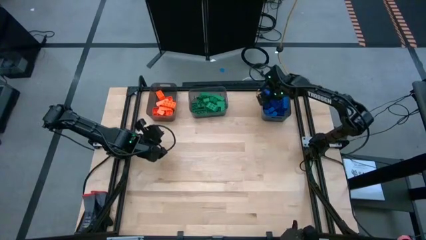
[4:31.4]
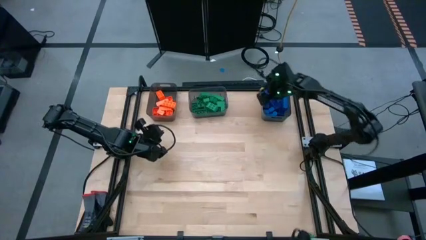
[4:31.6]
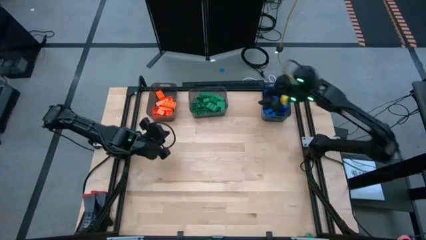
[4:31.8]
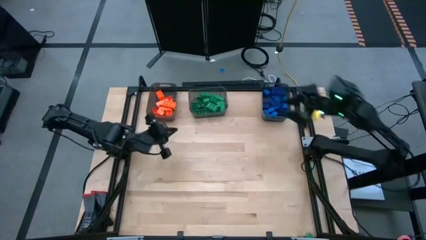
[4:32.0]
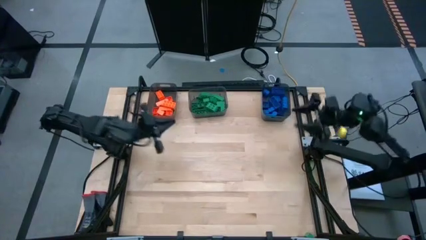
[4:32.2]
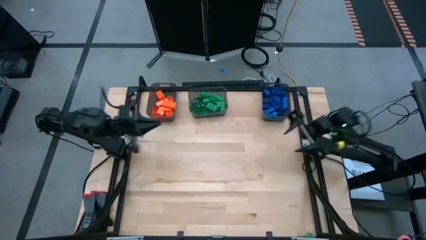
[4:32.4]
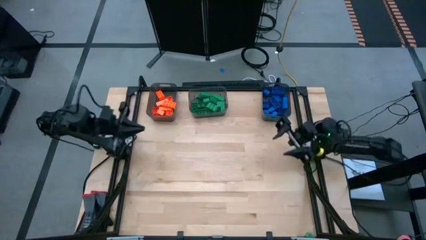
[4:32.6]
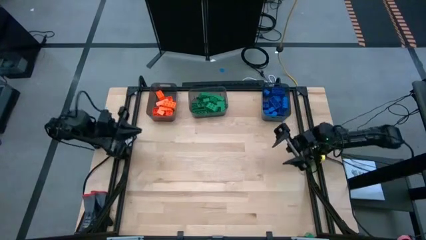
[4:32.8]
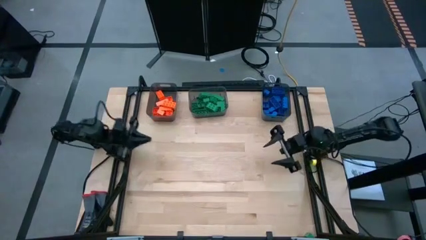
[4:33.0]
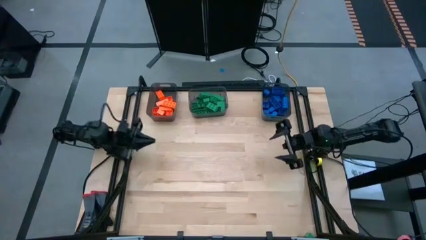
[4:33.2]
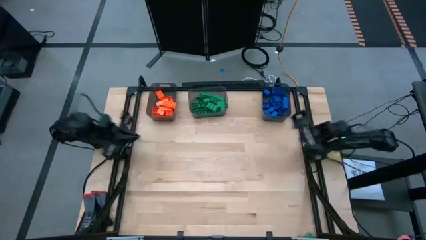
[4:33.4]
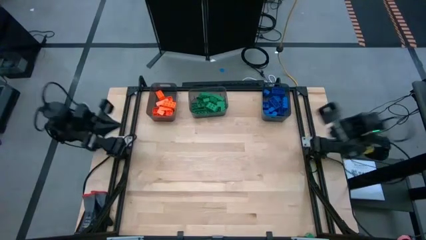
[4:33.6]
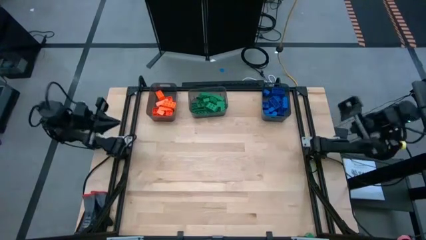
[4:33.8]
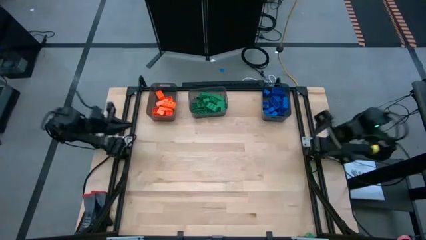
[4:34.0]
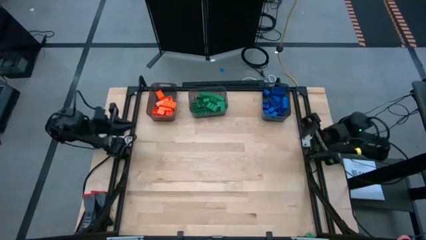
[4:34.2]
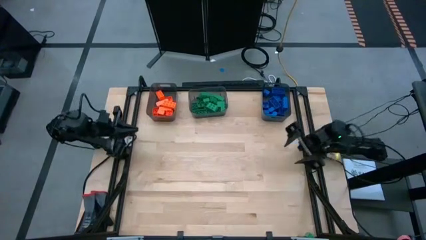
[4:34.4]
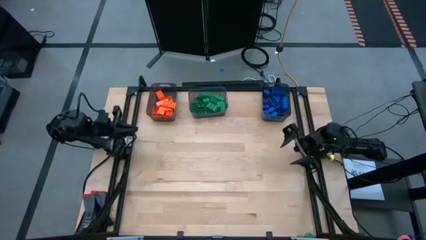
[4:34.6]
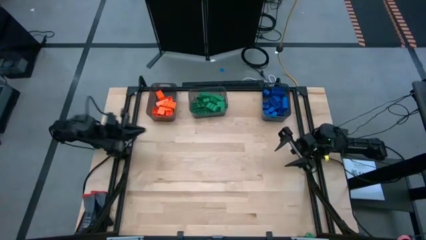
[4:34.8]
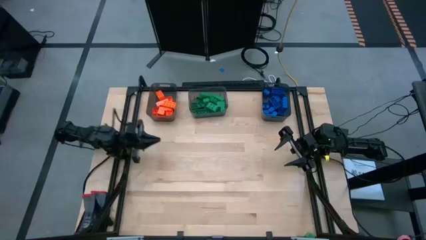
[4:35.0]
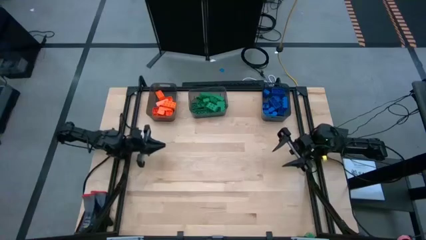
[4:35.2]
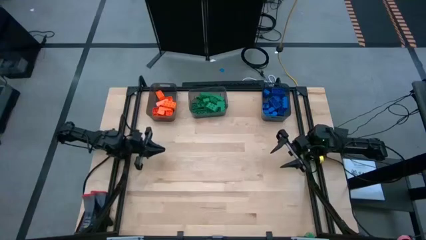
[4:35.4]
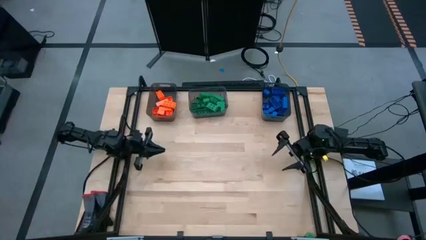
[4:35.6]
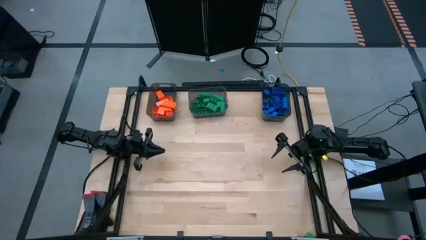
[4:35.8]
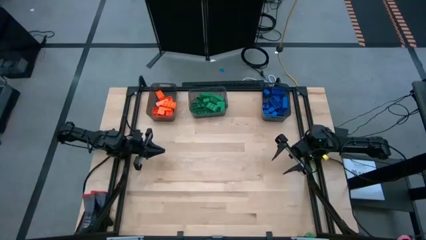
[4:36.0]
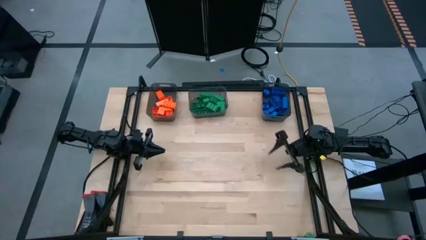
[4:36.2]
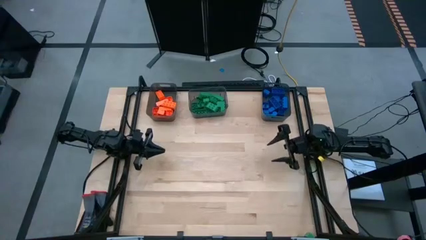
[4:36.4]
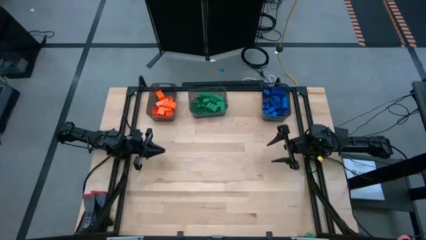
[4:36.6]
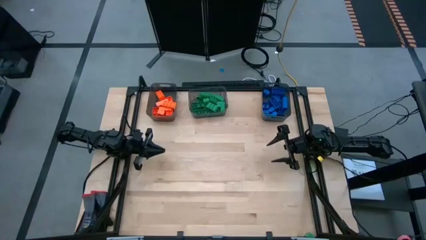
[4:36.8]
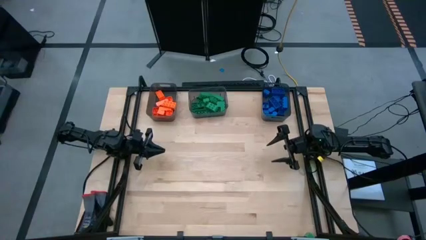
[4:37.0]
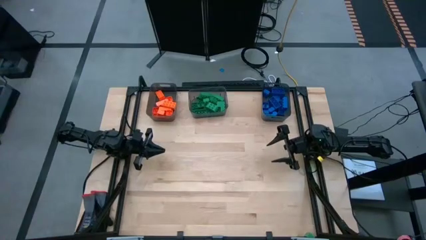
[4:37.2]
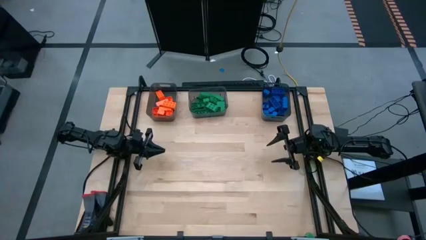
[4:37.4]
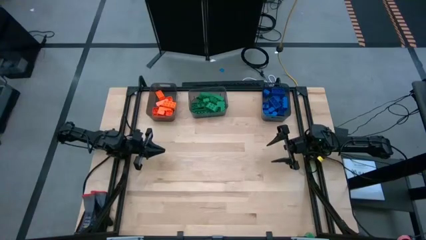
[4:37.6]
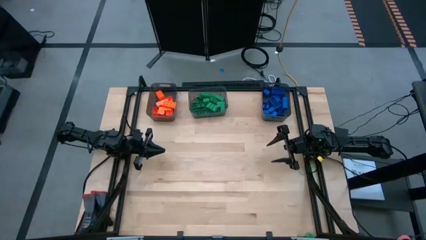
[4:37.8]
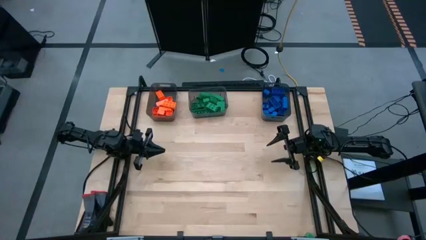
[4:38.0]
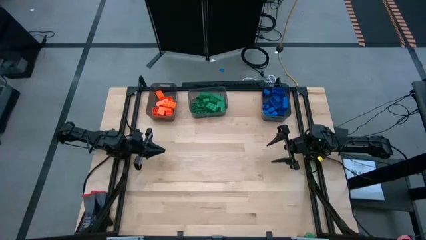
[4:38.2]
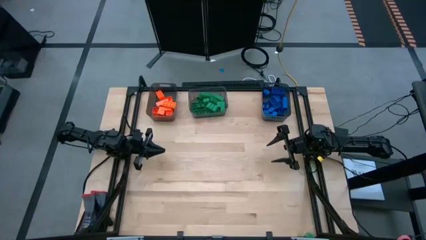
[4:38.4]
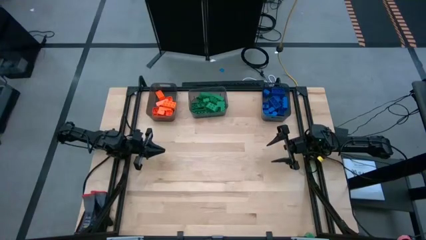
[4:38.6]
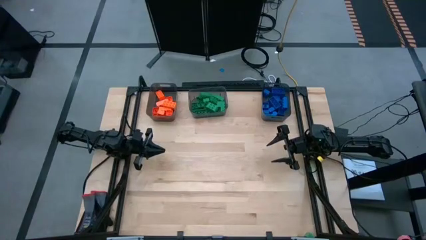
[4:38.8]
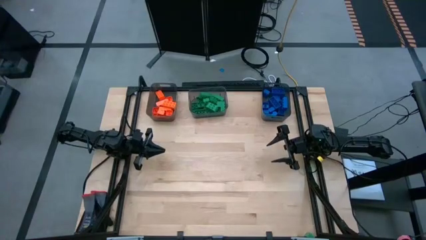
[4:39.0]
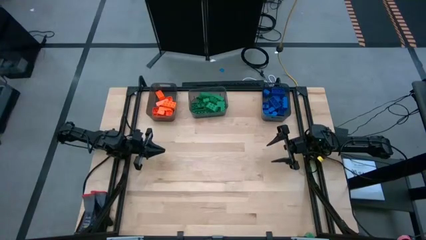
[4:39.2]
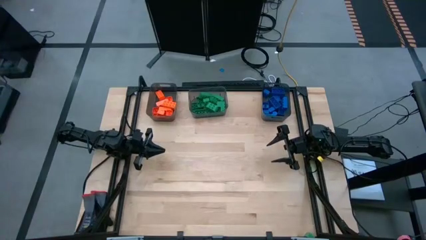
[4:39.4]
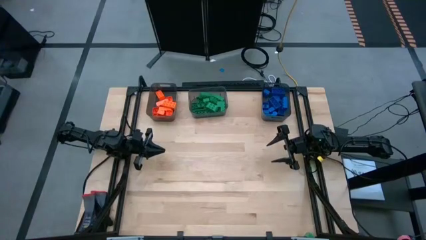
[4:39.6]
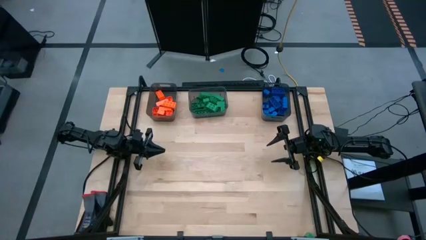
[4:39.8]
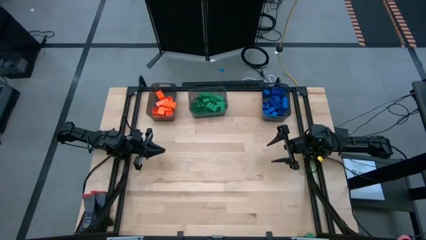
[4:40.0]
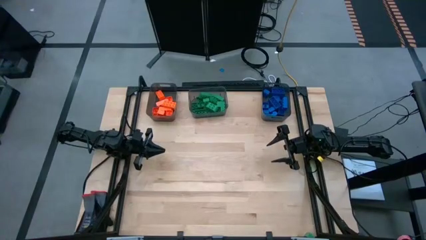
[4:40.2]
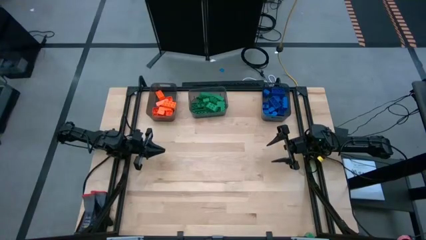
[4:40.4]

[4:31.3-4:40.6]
Task: Sort blocks
Return to Home Position

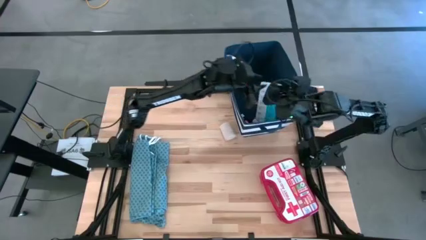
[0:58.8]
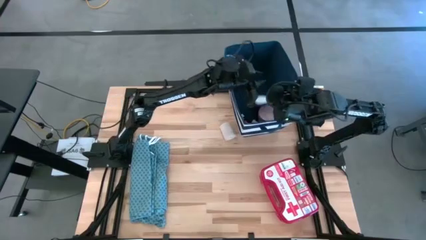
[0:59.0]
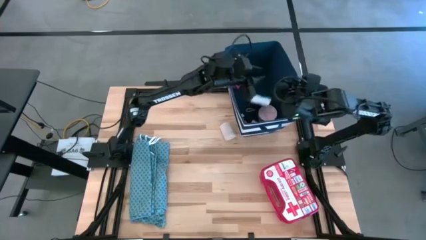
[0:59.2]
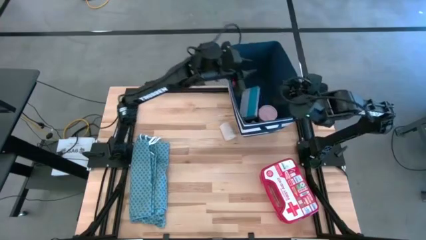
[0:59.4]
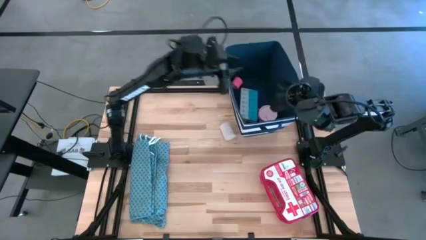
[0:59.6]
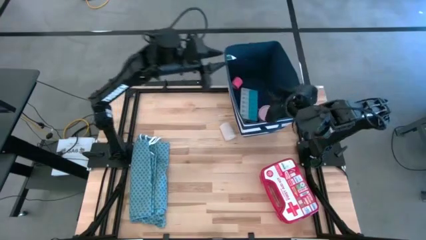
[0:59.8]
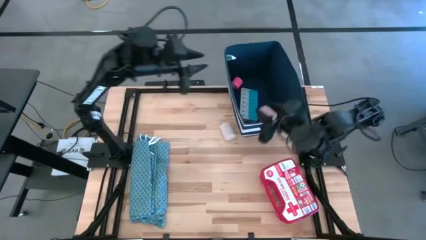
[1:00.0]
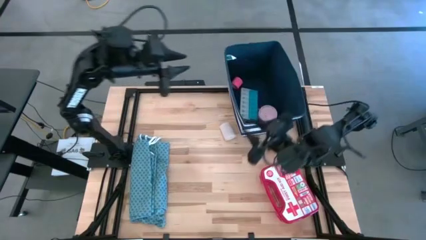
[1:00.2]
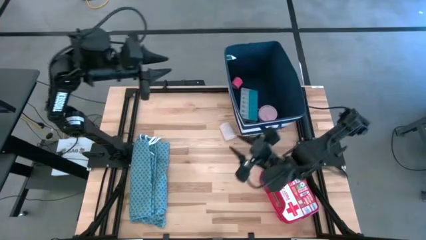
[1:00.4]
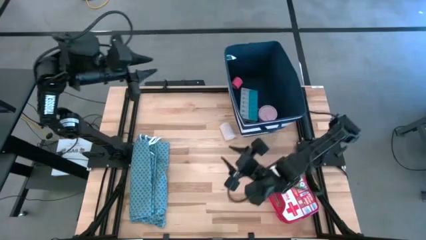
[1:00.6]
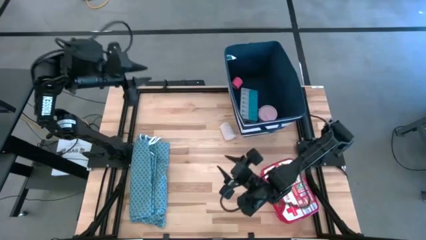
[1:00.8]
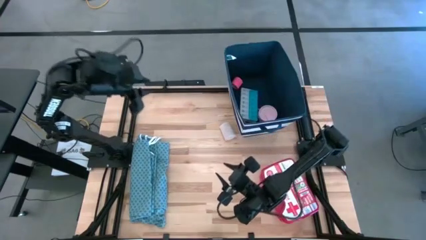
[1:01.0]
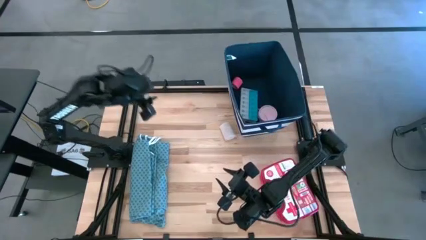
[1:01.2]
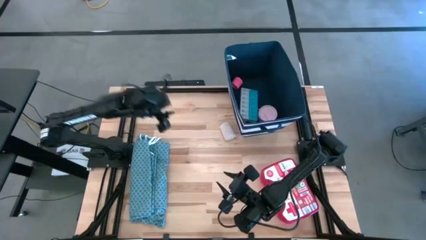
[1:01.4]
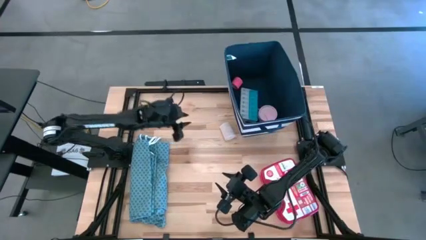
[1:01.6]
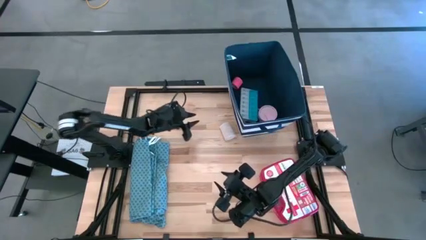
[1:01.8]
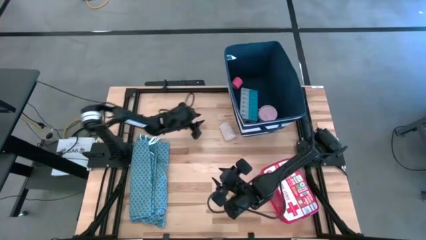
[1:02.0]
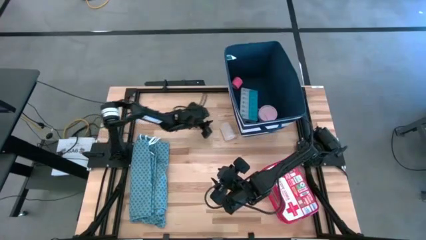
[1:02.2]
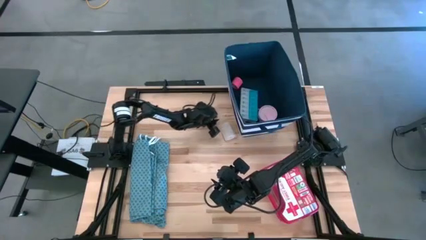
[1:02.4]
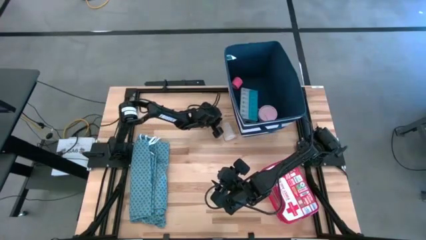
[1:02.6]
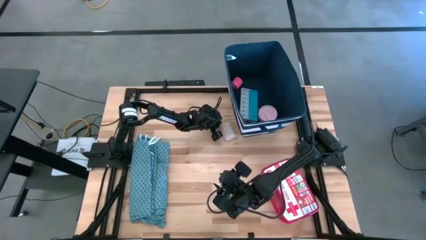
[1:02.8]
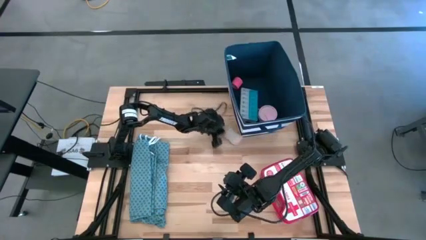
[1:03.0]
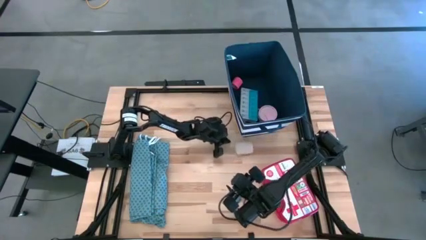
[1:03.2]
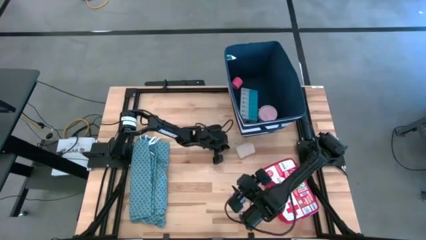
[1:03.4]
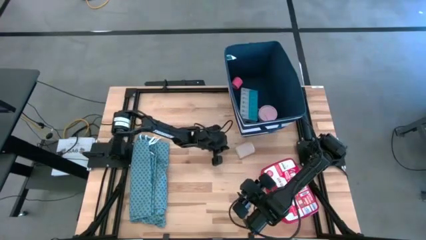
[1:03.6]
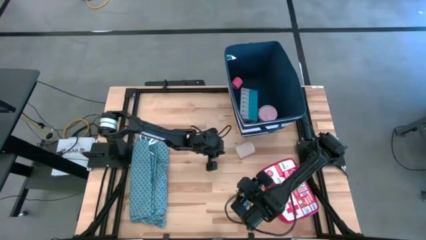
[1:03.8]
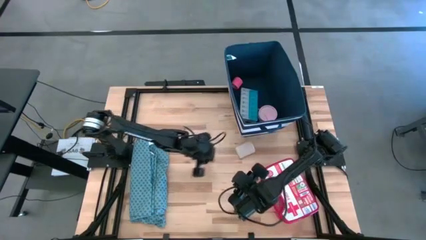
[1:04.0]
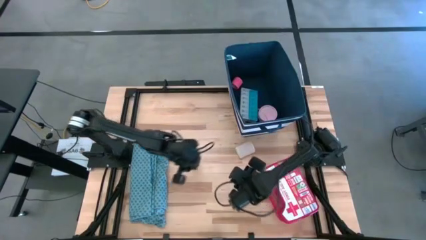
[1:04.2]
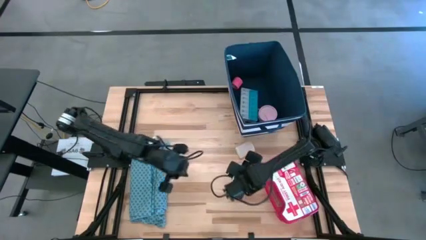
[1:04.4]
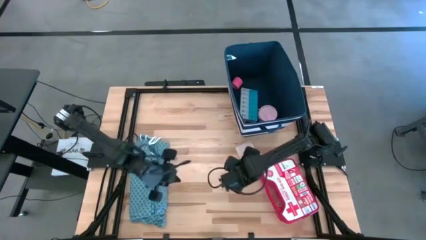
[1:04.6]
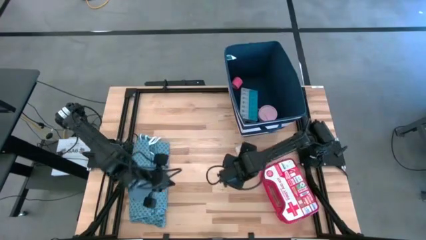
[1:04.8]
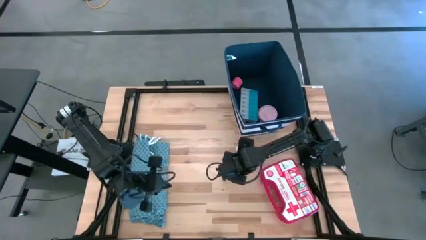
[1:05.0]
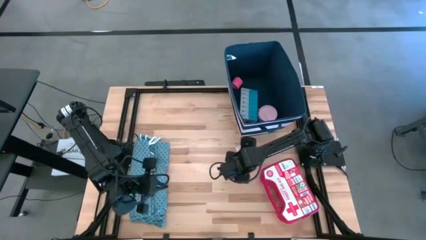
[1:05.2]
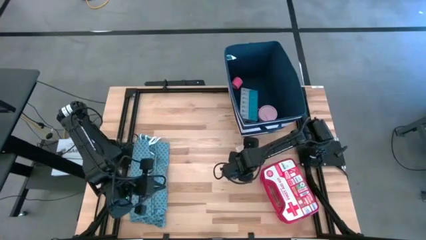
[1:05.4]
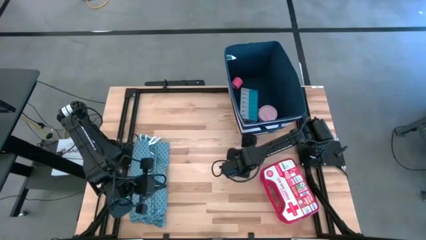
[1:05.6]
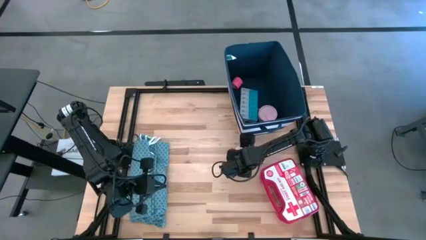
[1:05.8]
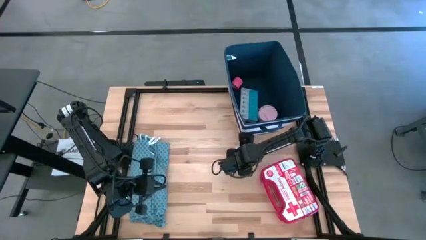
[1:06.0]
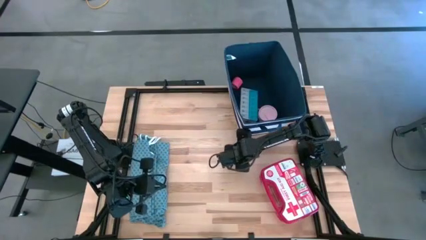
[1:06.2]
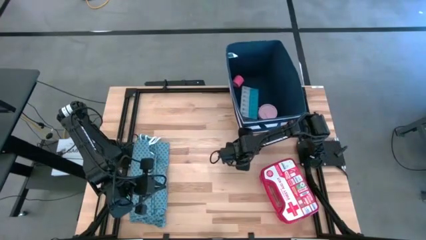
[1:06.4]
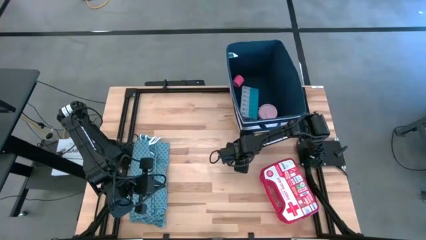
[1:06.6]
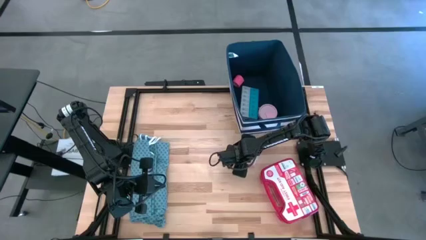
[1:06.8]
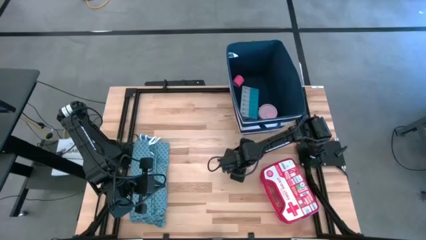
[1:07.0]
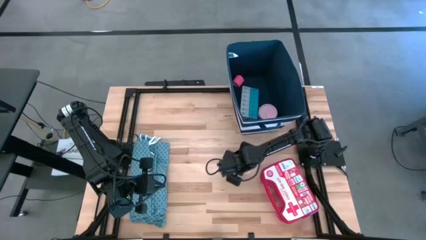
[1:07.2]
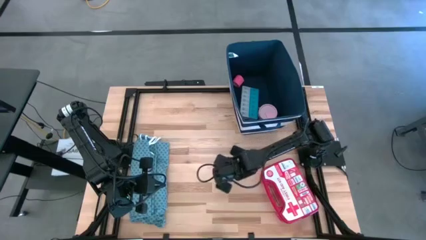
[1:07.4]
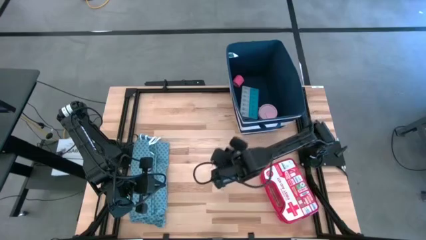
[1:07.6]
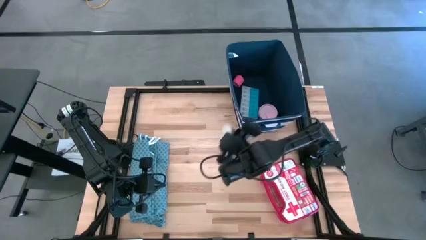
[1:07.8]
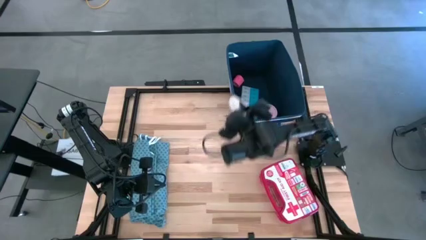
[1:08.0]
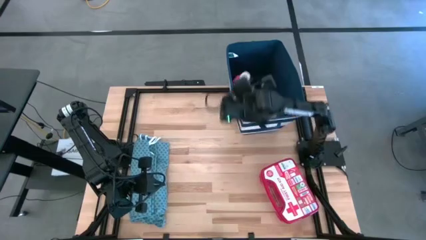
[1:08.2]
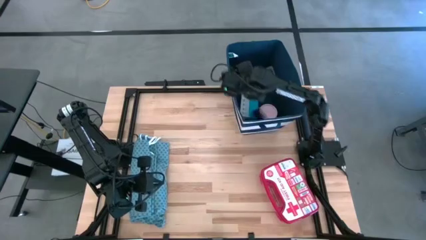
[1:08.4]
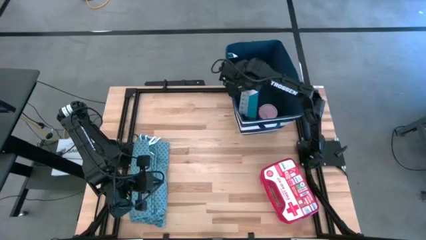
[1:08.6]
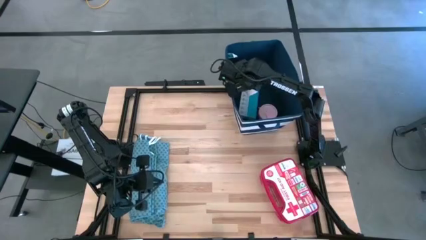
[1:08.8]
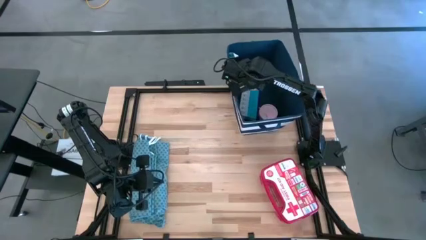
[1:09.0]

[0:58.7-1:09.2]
Task: Pick & place medical supplies in basket/bin
Put the white bandage into the blue bin
